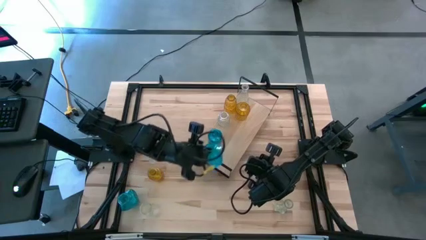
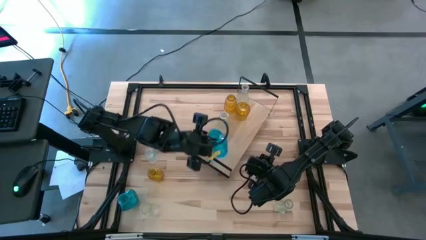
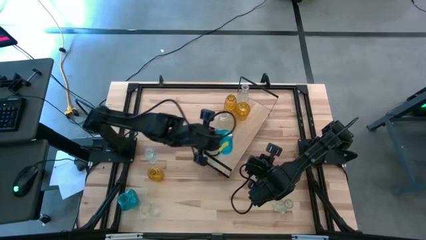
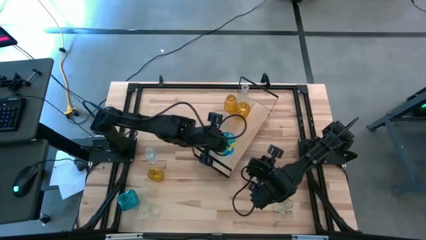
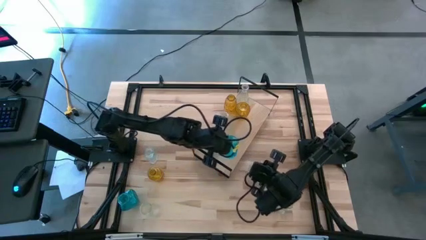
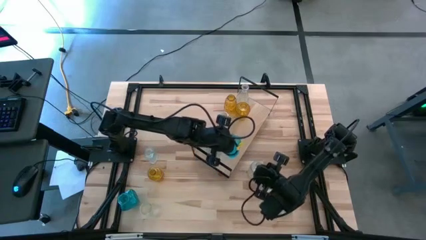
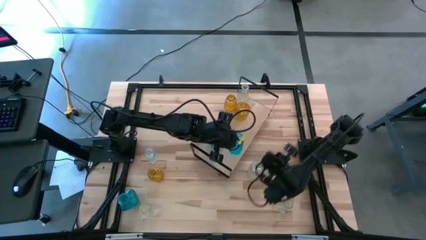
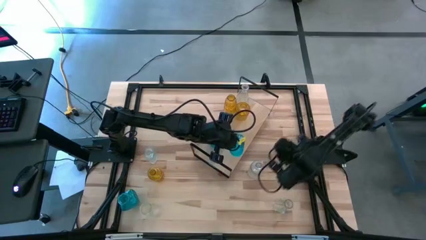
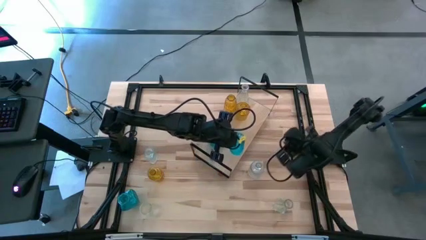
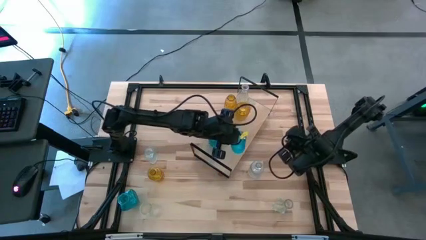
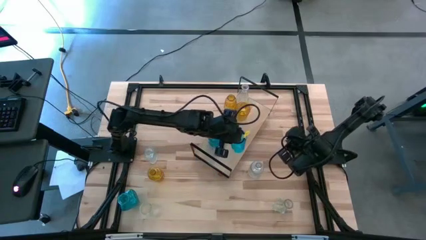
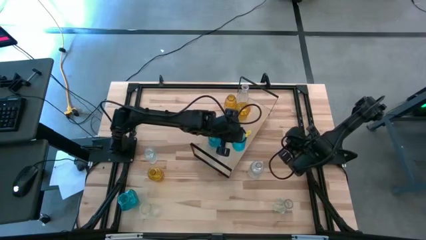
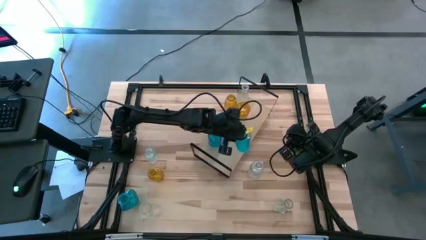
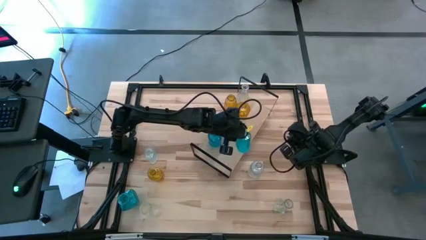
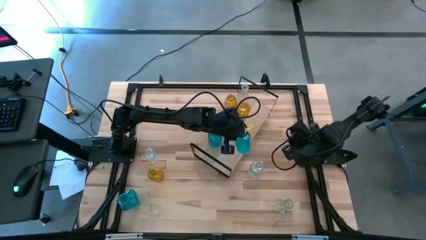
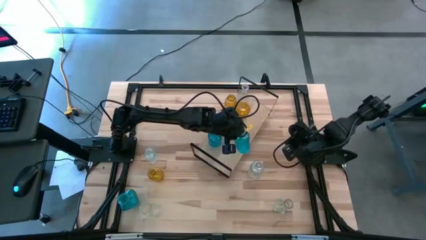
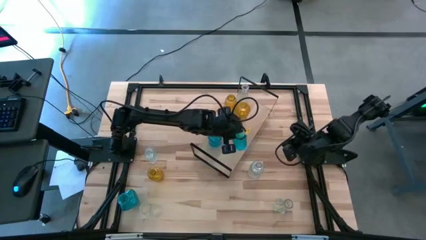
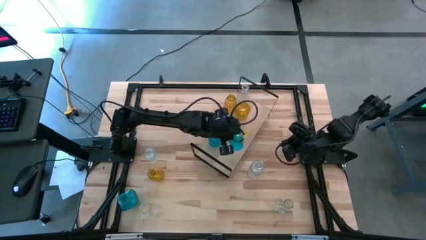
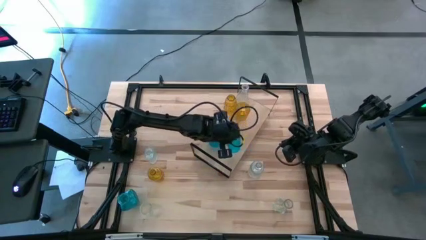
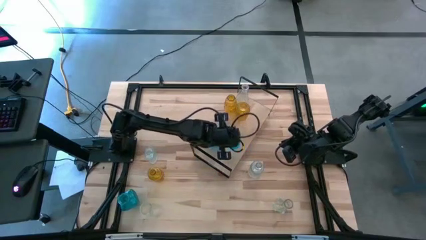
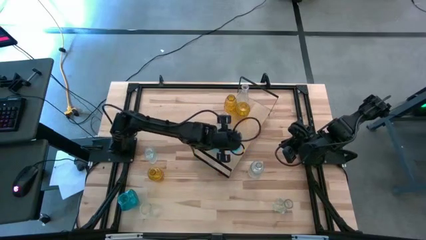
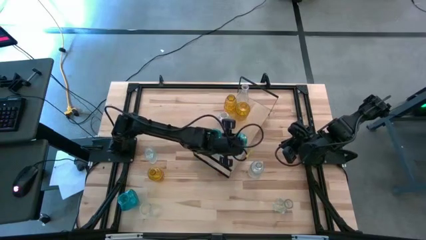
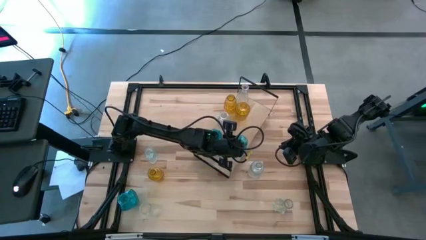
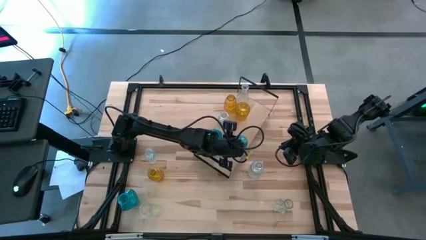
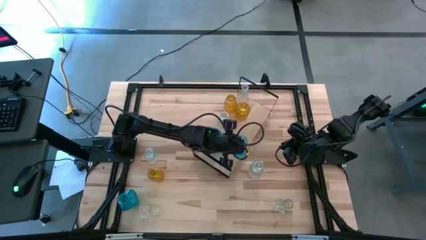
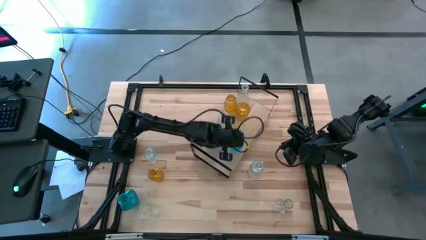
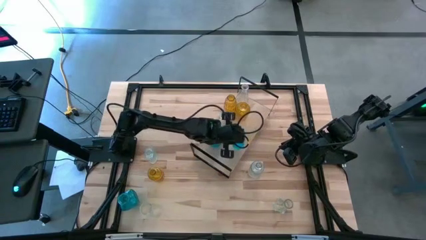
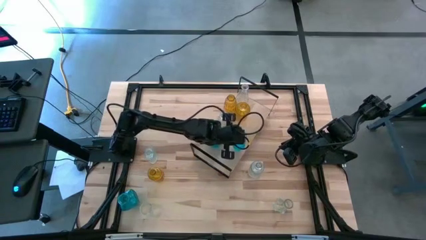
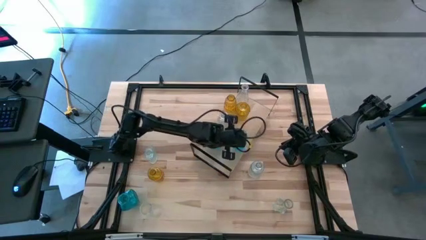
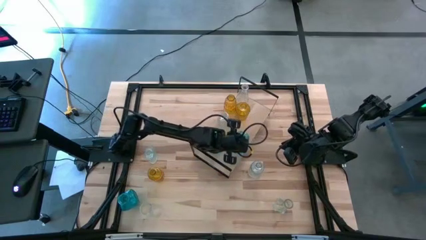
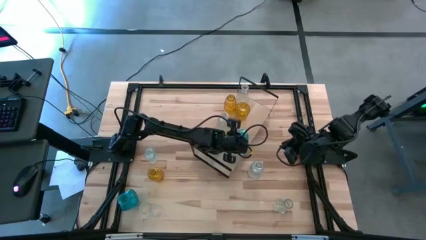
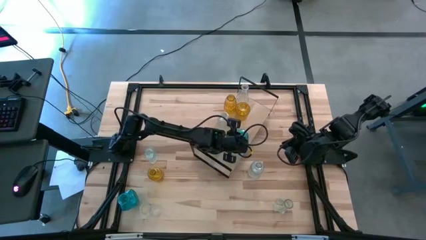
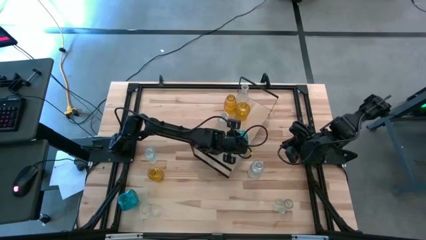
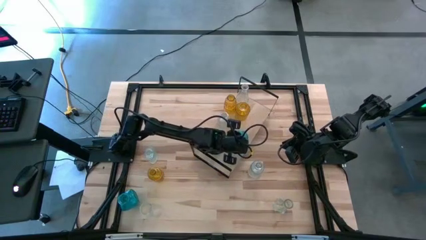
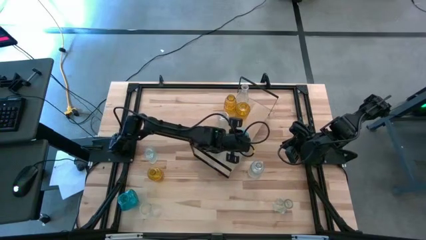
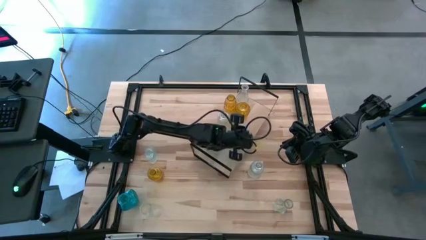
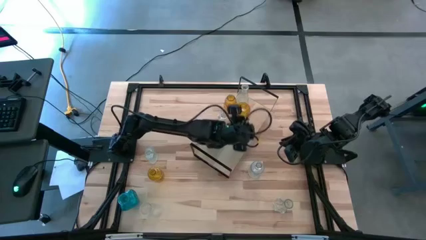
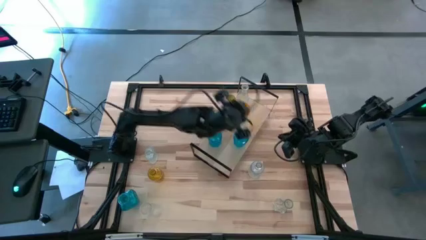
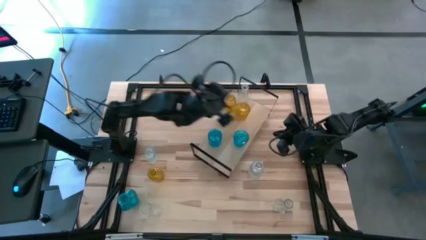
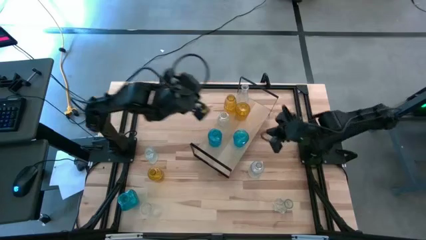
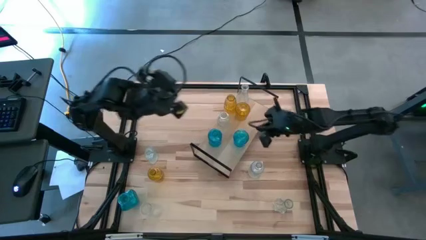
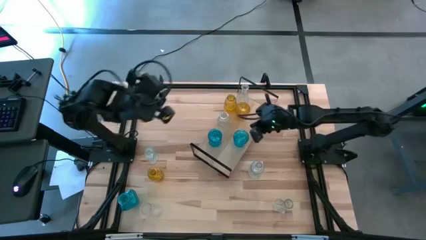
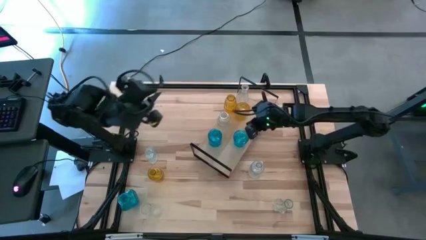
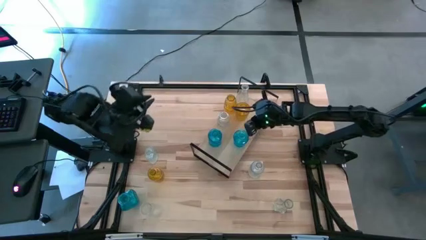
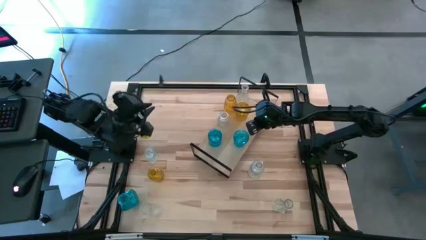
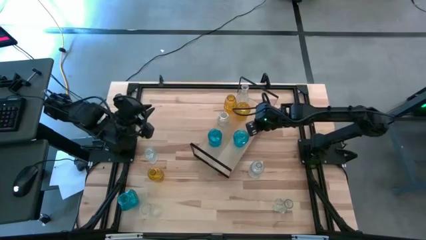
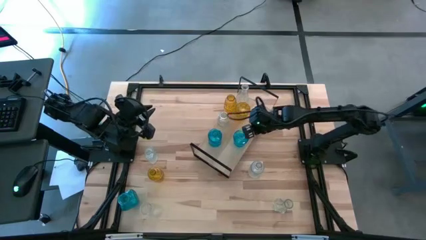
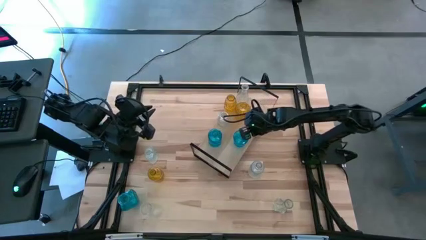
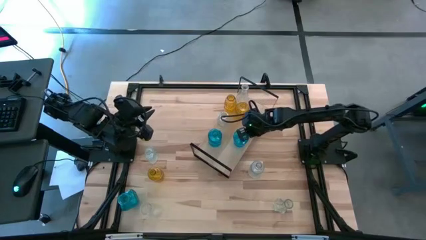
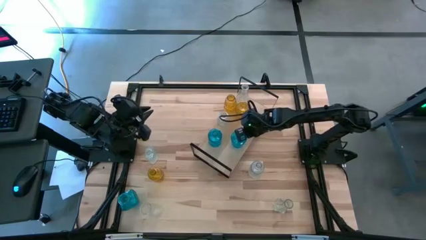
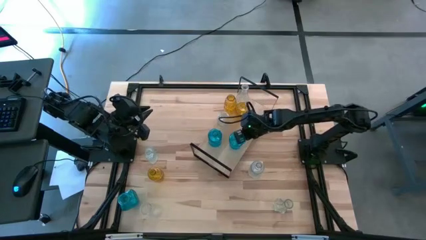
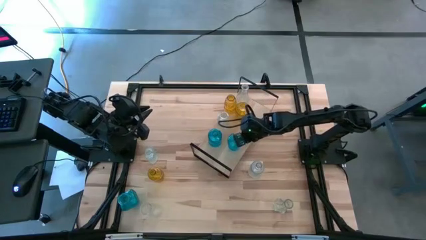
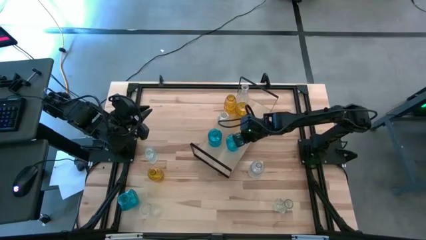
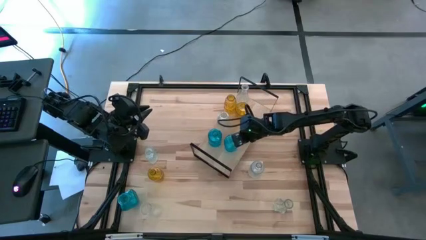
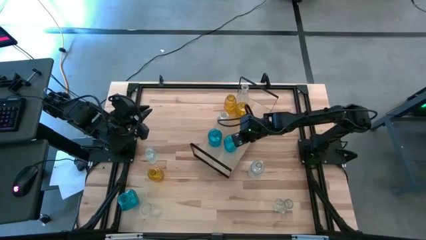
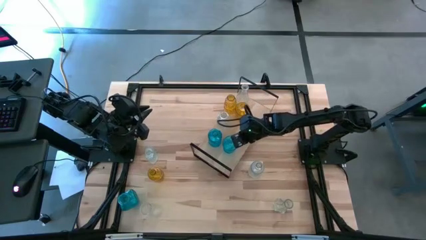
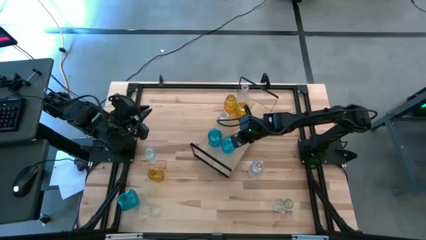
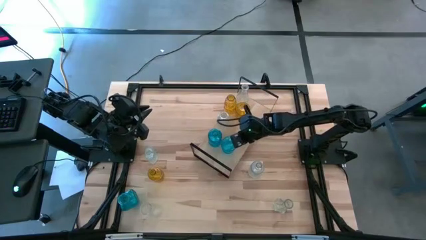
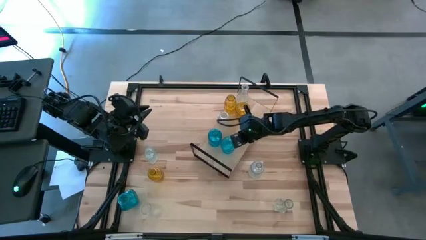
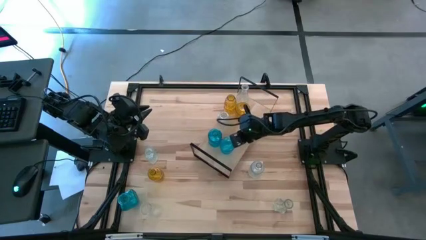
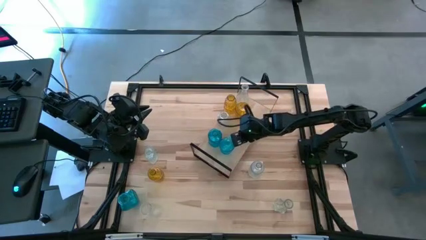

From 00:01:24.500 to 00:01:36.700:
Task: sort vases onto shelf
Put the right blue vase on the shelf and align with the other blue vase
